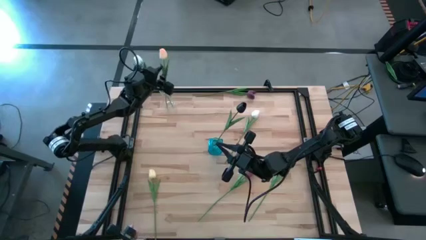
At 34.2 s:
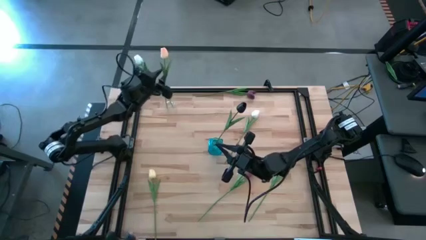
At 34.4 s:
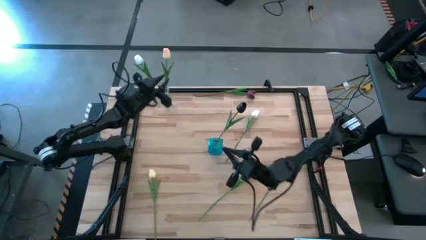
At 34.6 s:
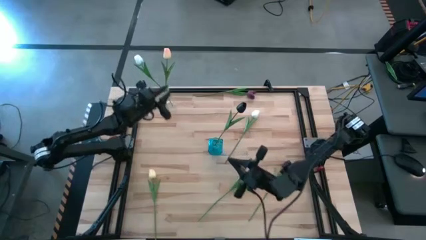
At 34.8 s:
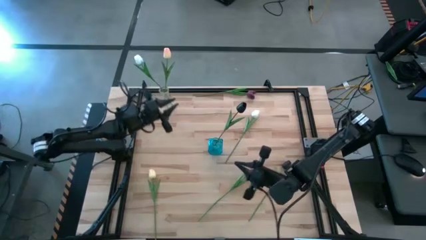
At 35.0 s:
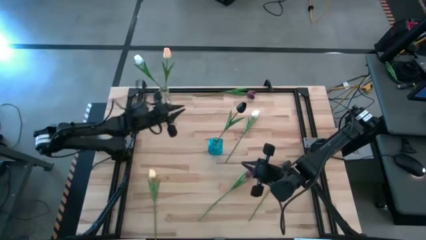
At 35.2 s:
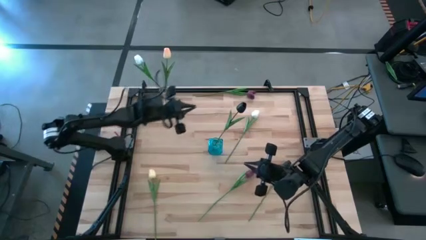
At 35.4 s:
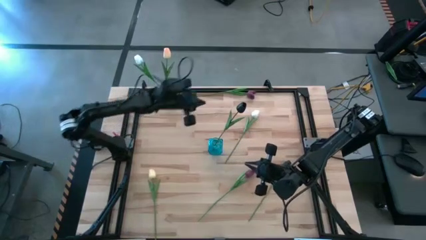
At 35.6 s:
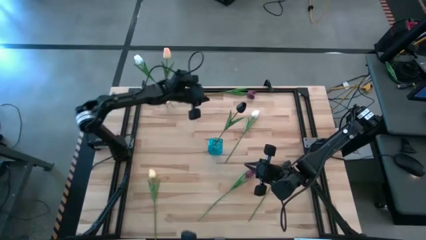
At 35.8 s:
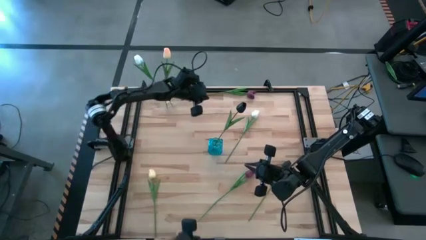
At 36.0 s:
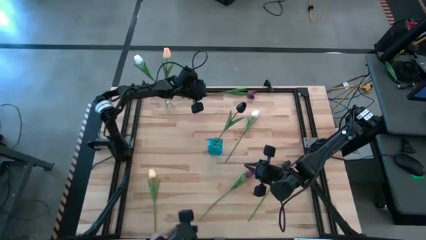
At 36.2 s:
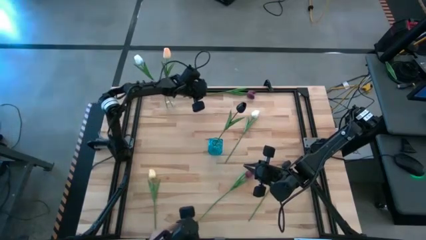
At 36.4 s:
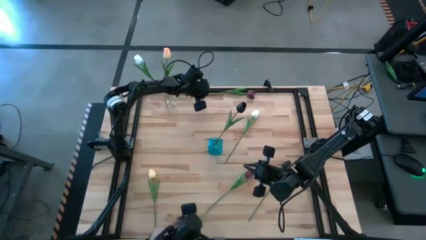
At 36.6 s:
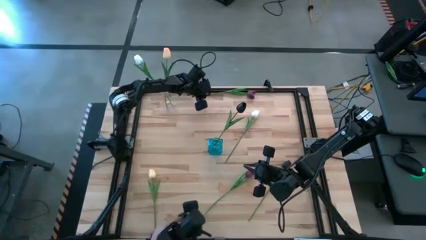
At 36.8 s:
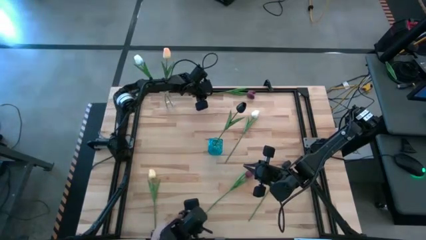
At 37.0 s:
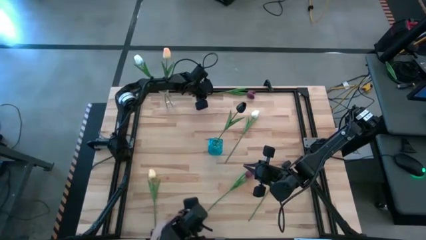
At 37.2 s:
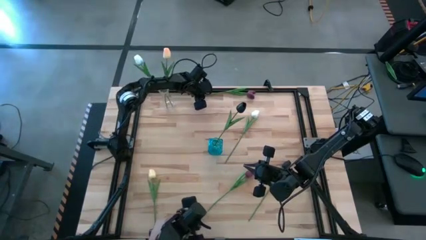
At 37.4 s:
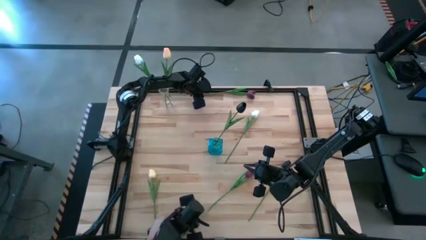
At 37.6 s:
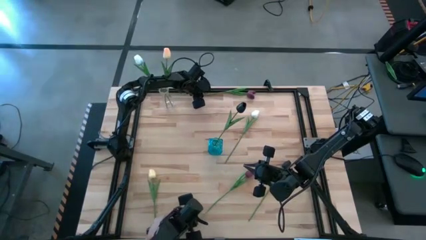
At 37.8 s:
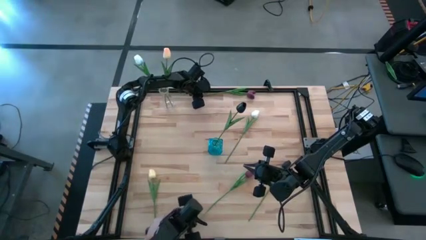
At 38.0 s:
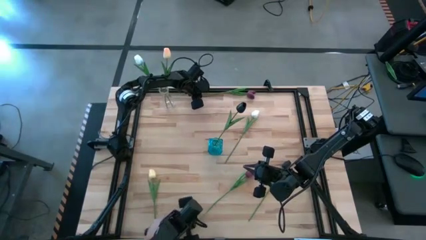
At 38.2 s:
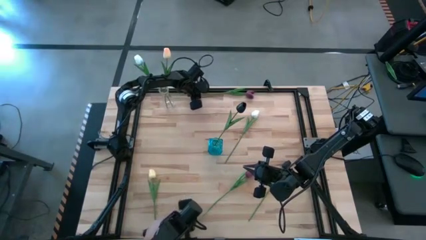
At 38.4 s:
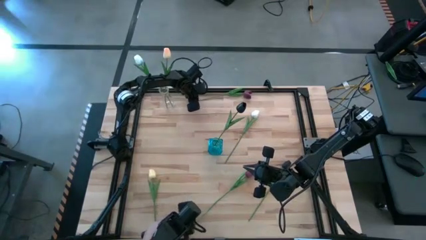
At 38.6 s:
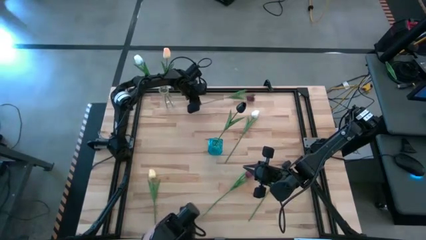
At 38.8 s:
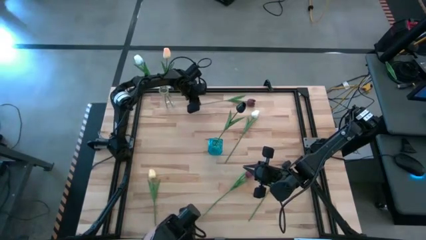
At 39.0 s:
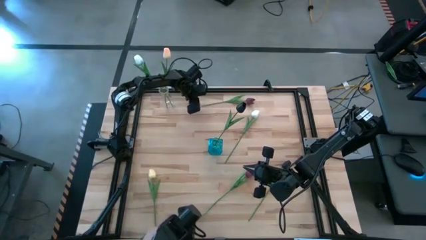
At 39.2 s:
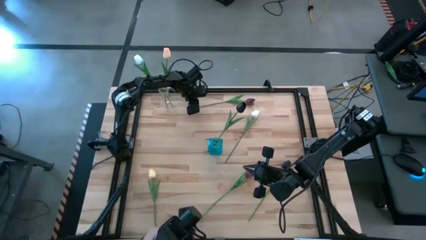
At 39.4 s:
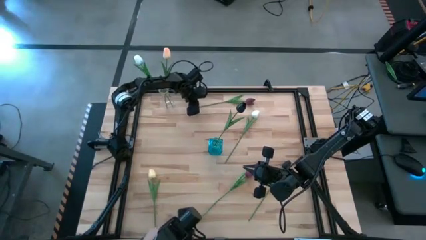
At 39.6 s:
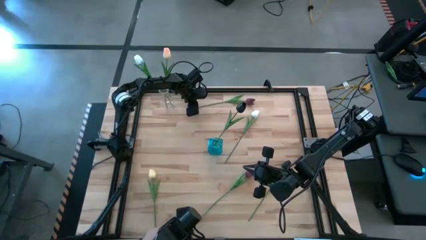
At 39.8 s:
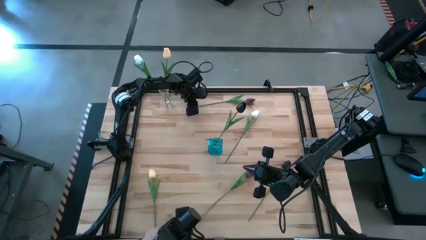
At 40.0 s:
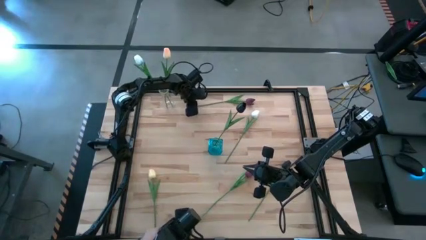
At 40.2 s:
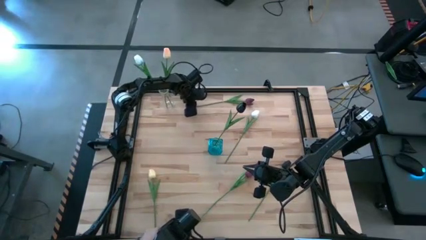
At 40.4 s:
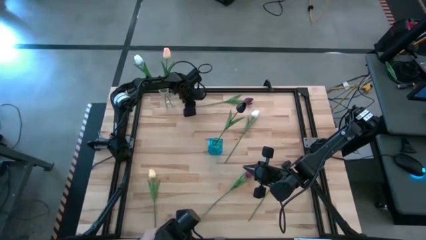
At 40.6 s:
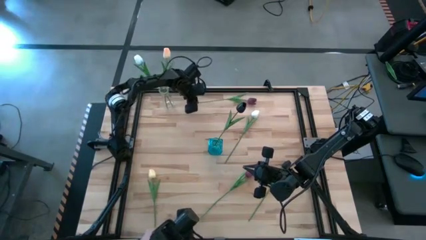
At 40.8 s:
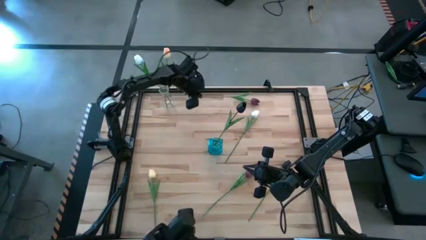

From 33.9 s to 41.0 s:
Task: Sort flowers into vase by color
Put the top dark red flower into the blue vase

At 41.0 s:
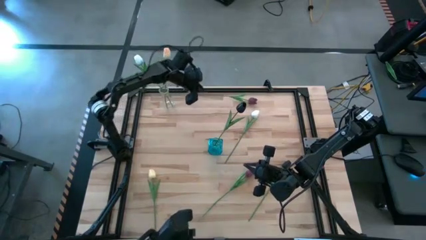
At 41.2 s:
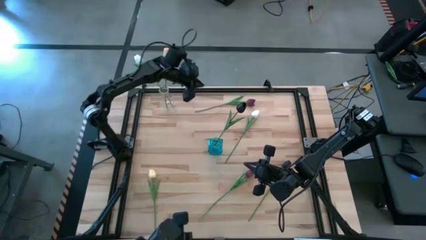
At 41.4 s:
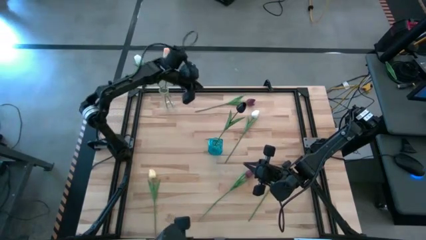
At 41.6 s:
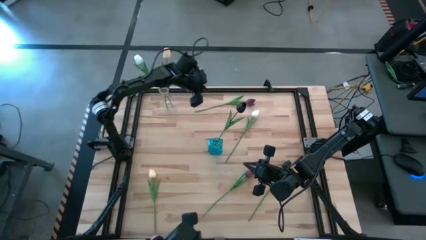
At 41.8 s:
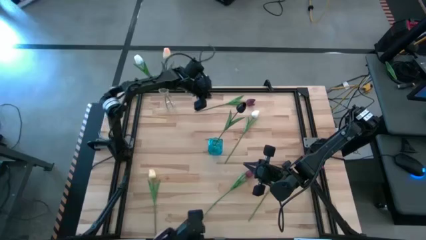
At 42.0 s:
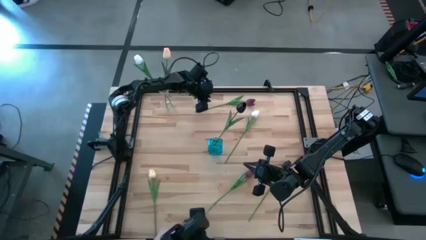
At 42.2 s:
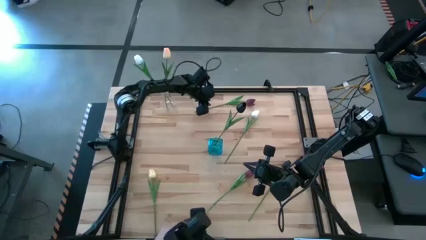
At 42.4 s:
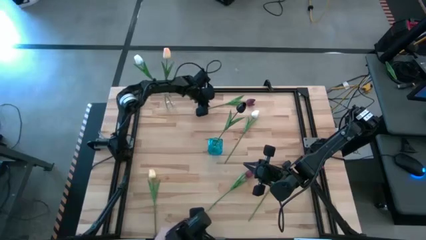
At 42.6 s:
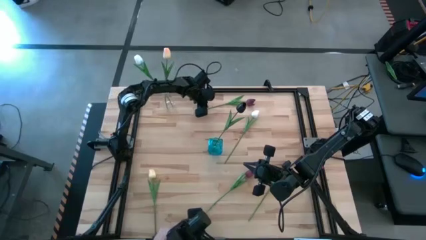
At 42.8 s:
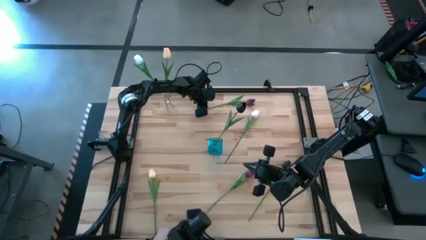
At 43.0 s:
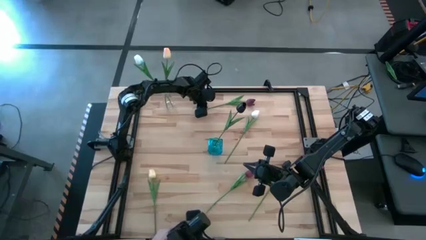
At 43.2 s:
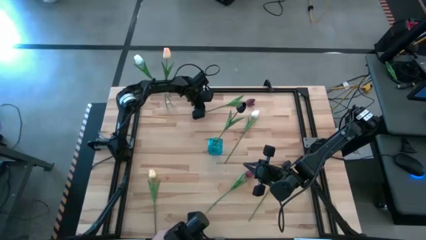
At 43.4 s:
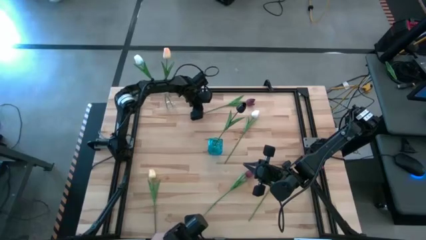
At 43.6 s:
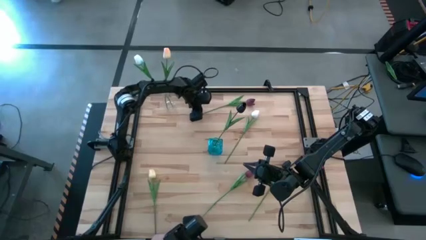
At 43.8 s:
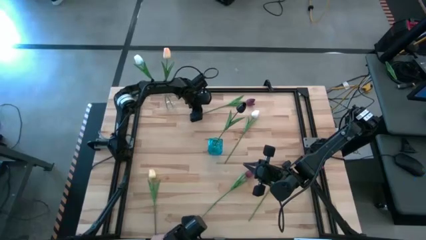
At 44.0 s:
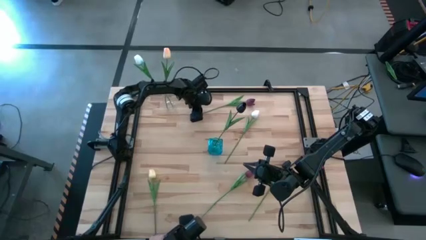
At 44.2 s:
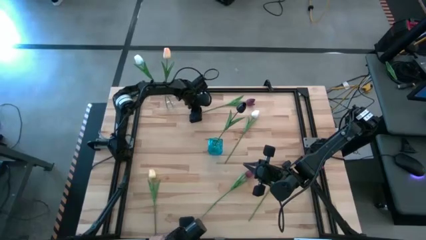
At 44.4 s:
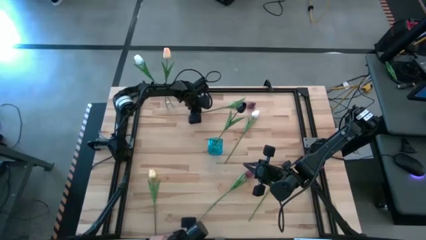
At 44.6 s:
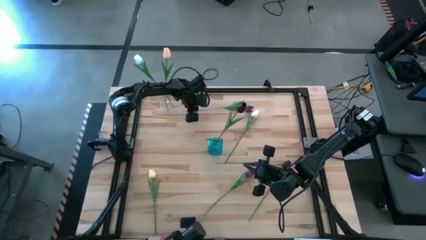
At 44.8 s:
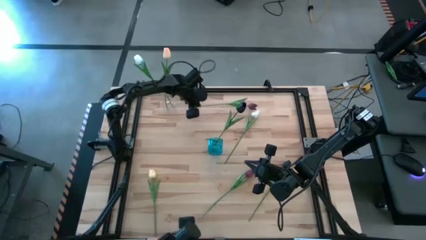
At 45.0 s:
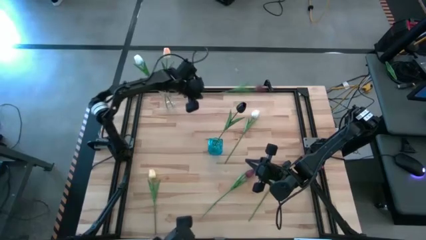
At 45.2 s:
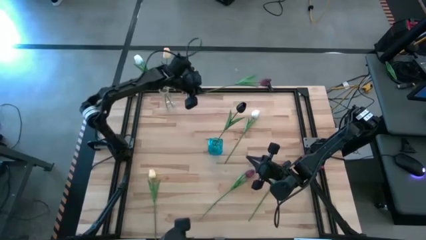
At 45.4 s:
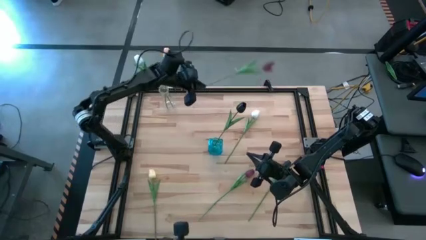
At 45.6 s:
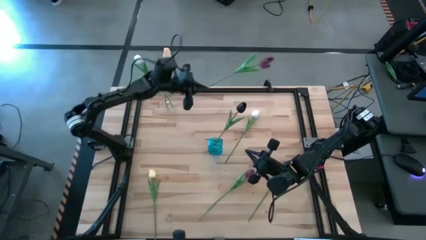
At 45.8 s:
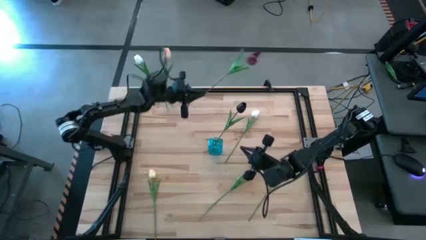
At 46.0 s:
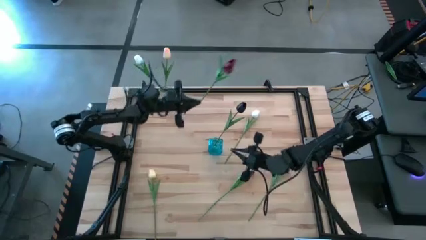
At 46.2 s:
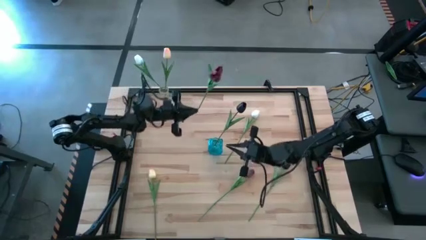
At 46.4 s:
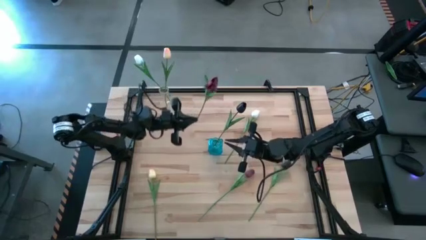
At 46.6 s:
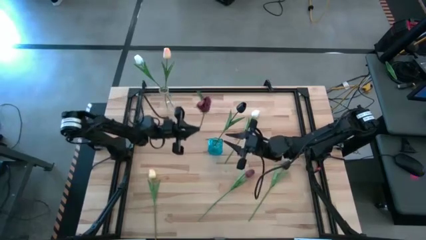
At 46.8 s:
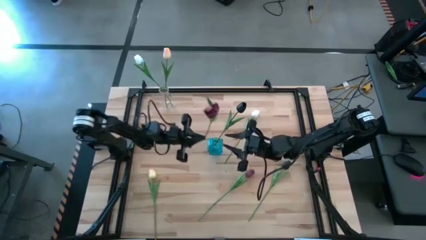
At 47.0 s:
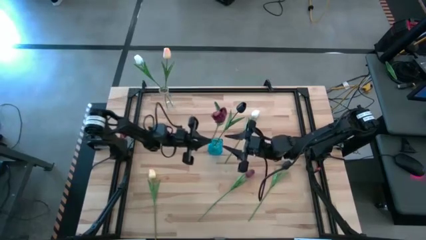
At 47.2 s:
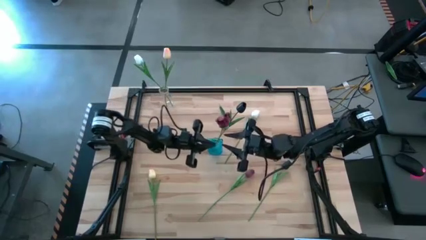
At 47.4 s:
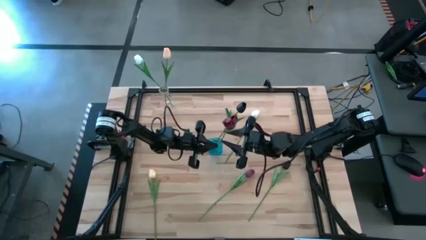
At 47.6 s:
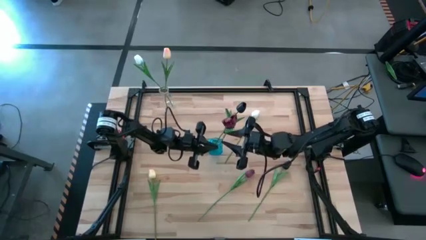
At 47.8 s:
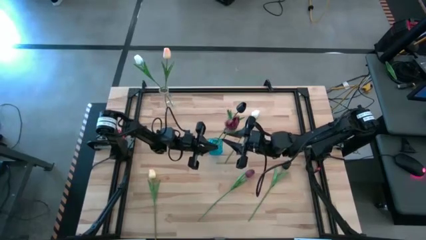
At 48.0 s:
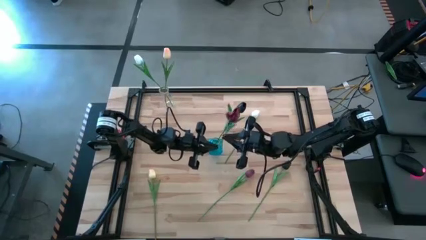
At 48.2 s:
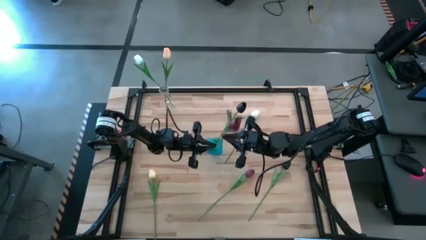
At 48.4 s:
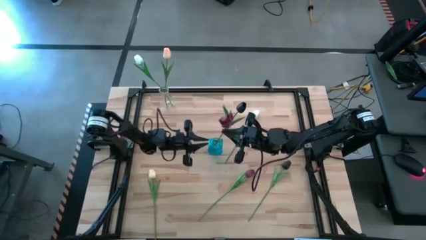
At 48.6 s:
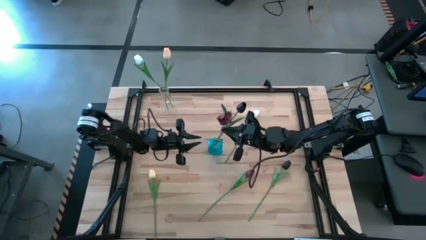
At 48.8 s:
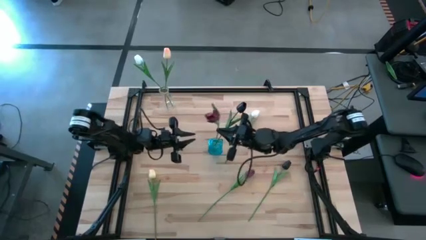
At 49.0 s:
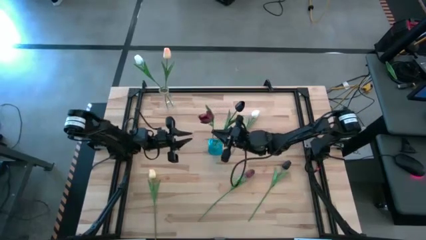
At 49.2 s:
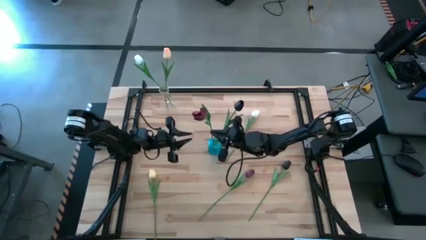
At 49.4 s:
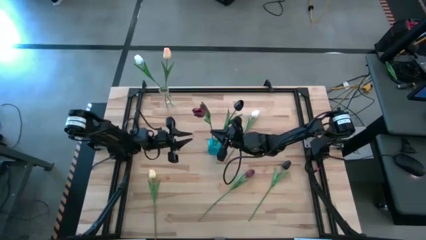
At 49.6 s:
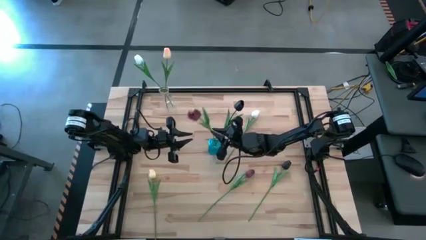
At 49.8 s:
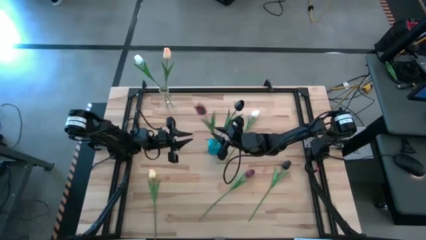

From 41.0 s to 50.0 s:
Put the top dark red flower into the blue vase
